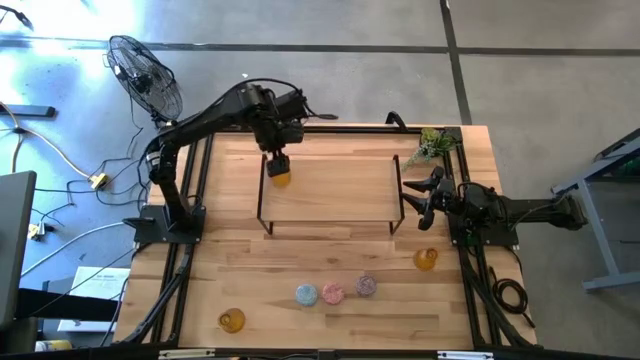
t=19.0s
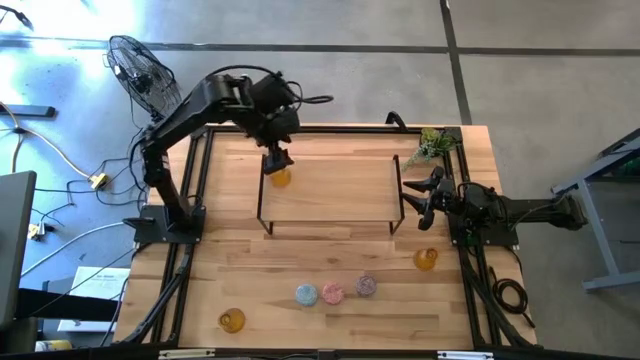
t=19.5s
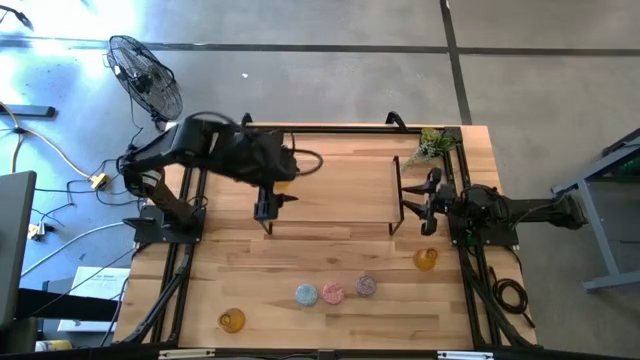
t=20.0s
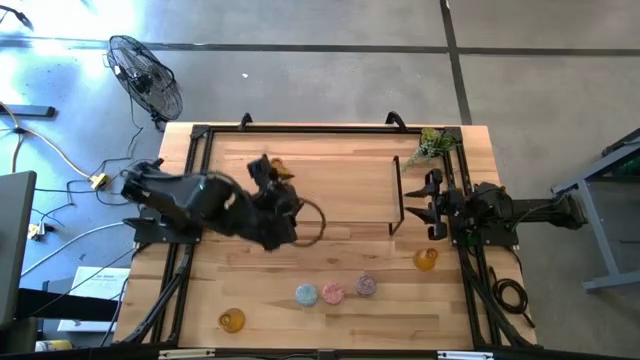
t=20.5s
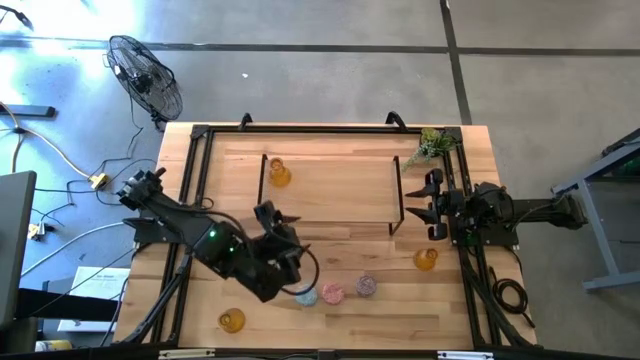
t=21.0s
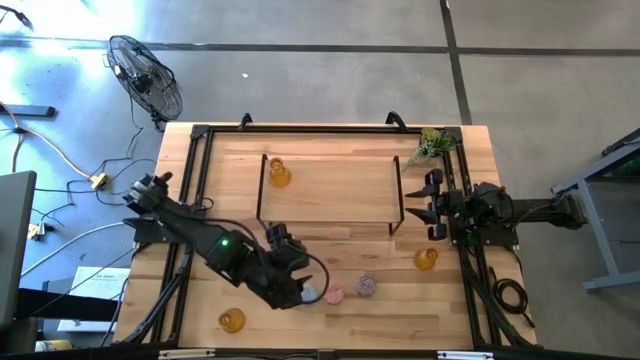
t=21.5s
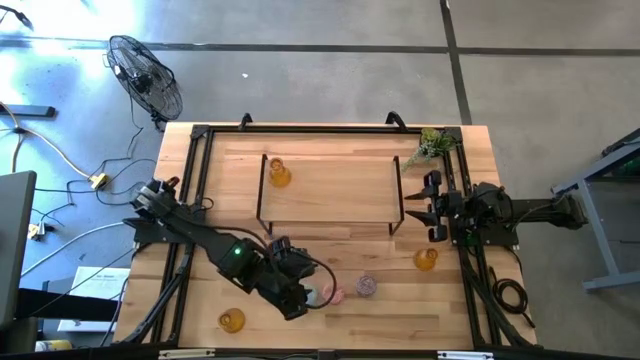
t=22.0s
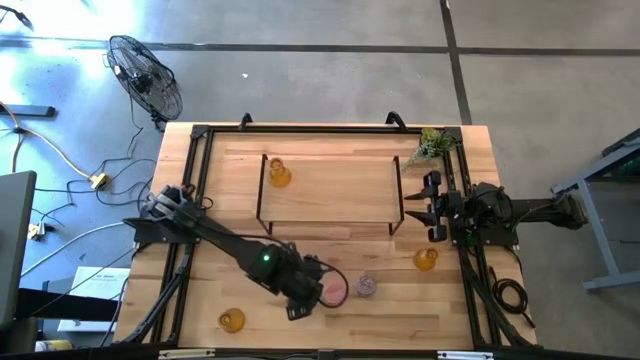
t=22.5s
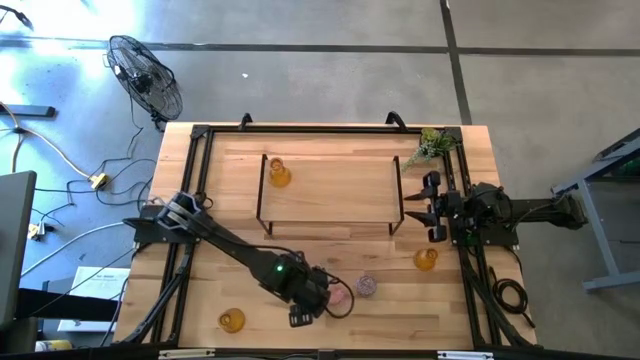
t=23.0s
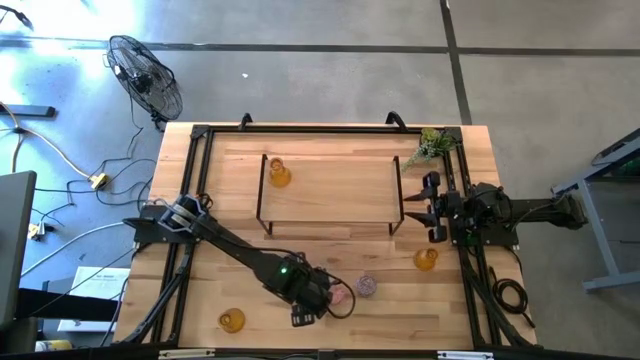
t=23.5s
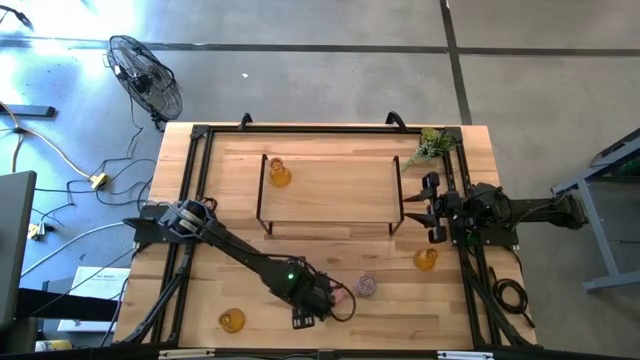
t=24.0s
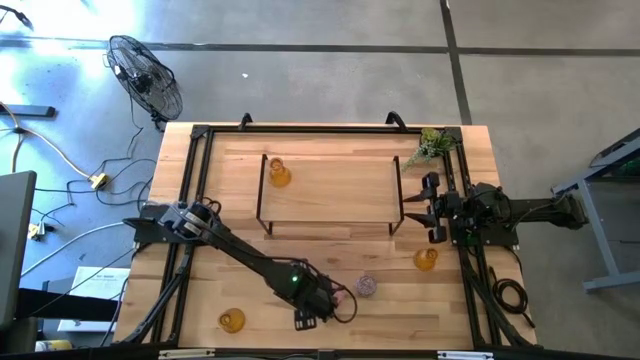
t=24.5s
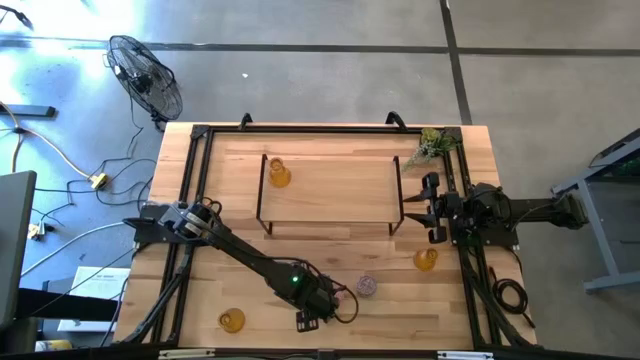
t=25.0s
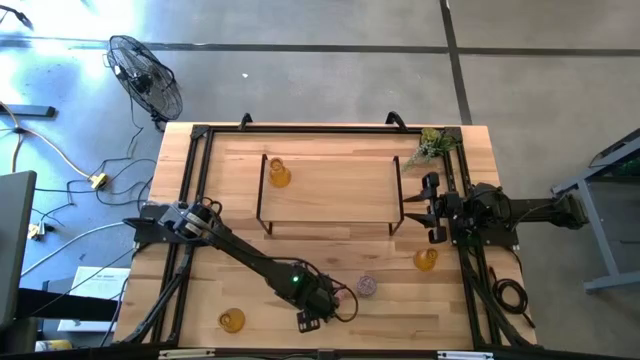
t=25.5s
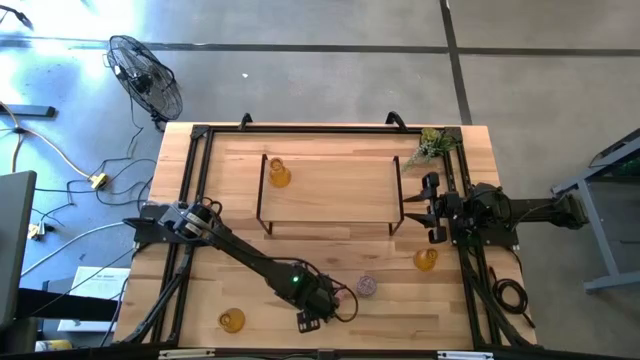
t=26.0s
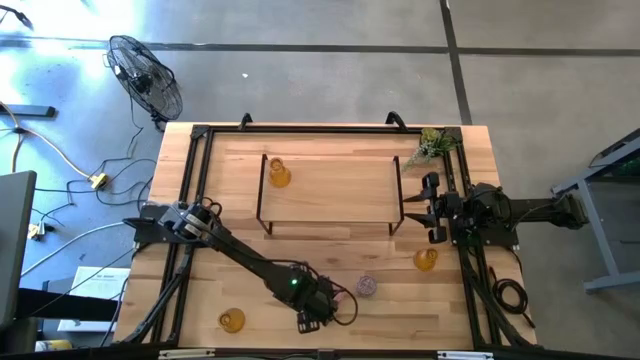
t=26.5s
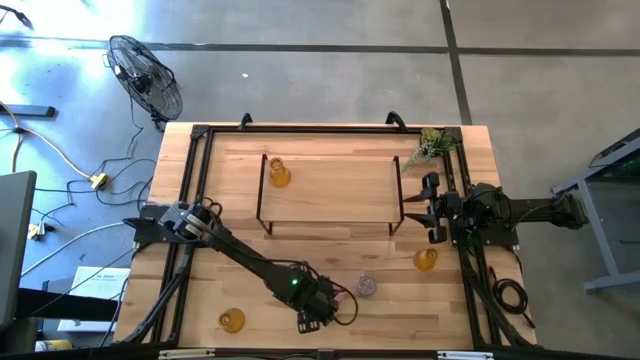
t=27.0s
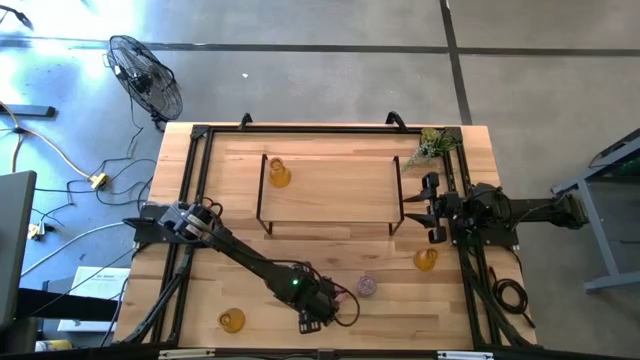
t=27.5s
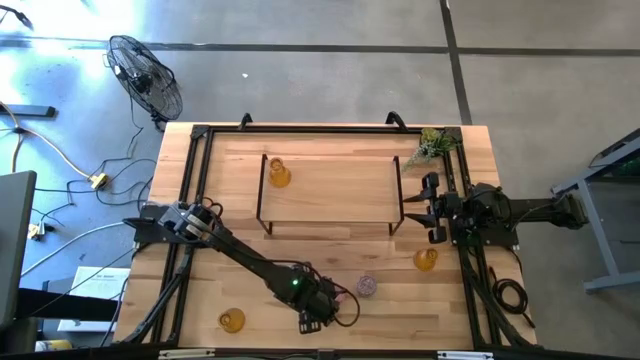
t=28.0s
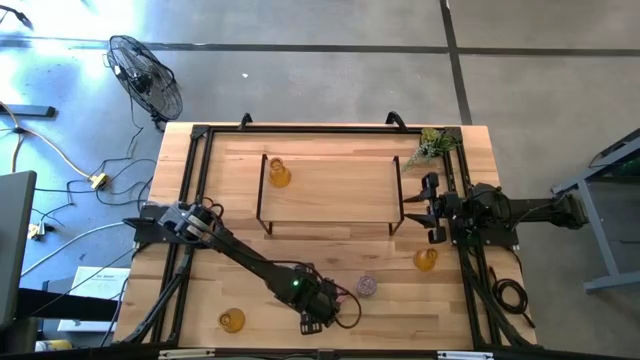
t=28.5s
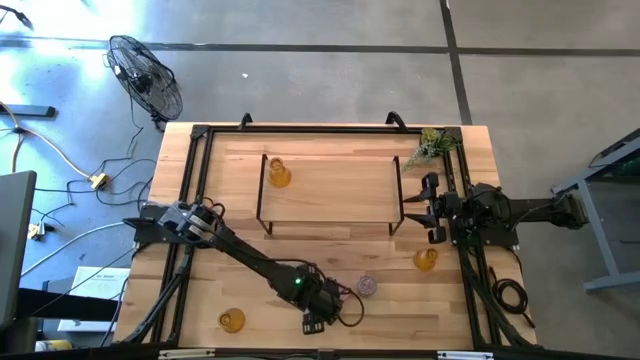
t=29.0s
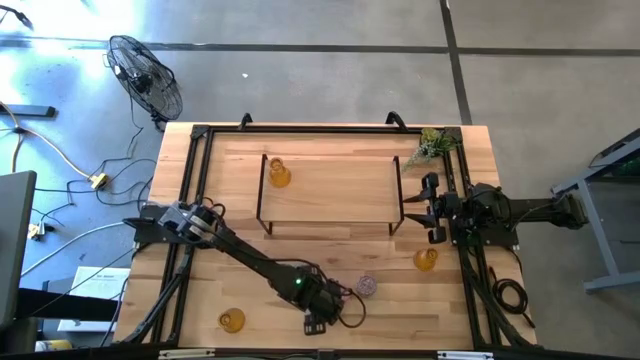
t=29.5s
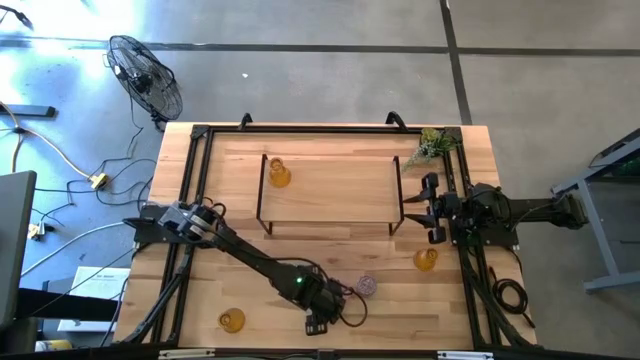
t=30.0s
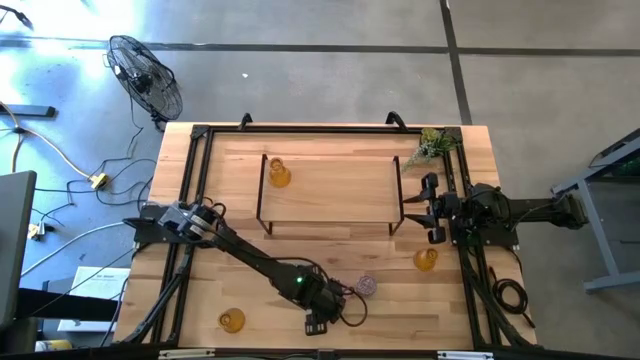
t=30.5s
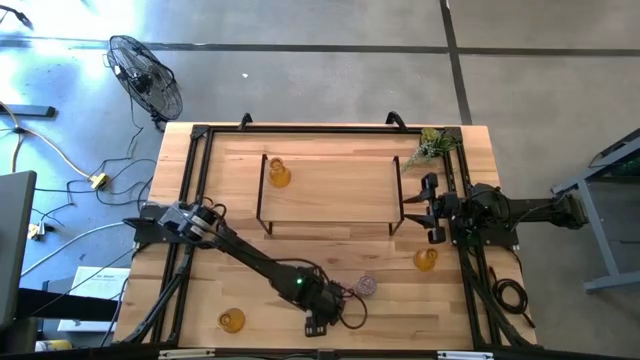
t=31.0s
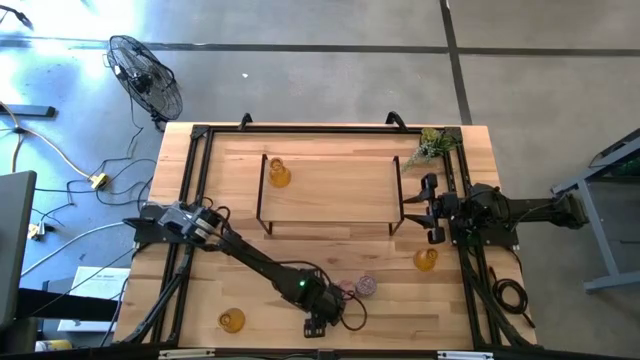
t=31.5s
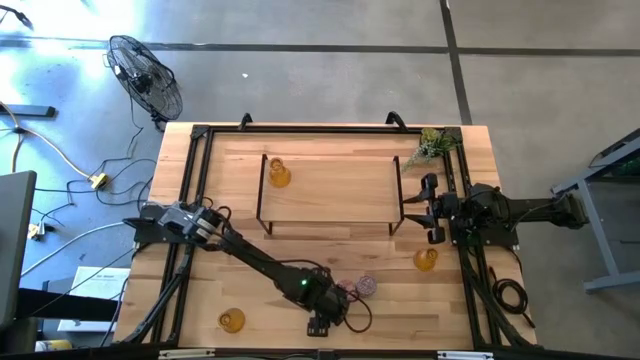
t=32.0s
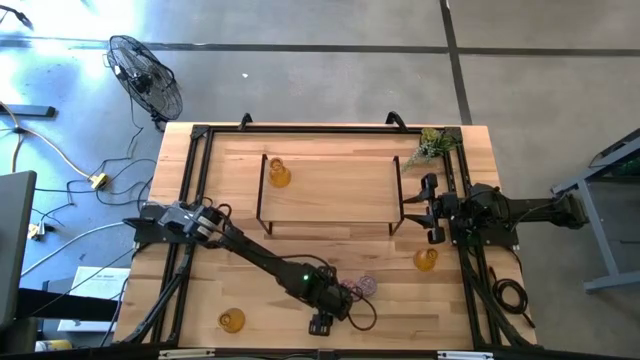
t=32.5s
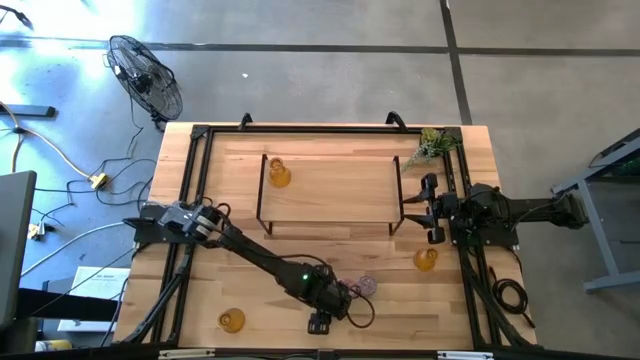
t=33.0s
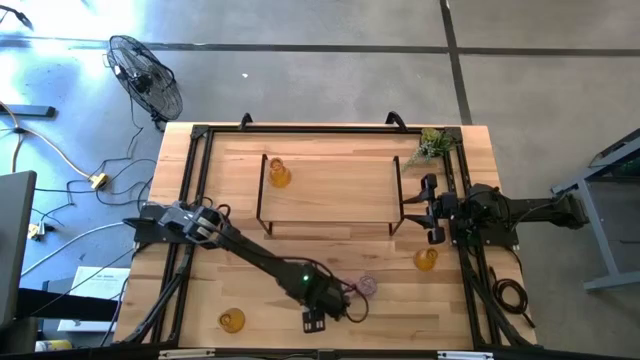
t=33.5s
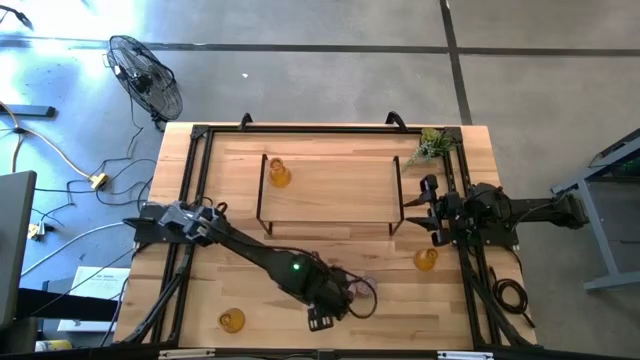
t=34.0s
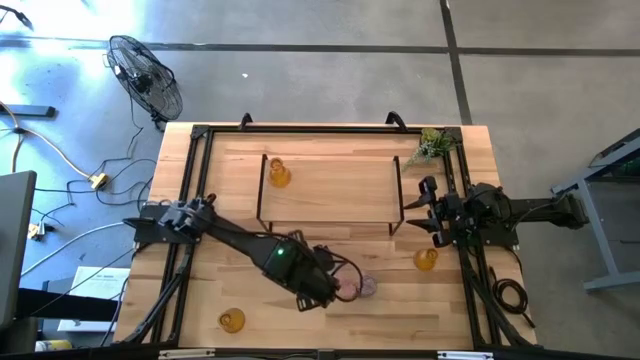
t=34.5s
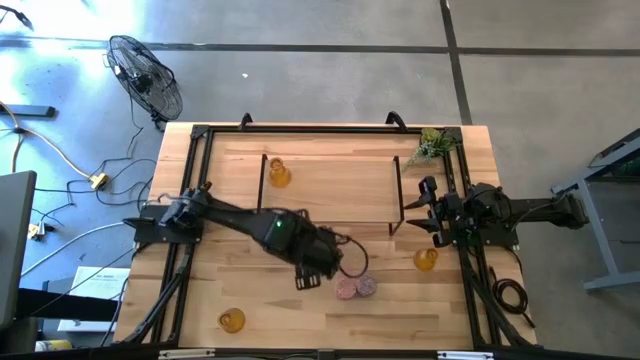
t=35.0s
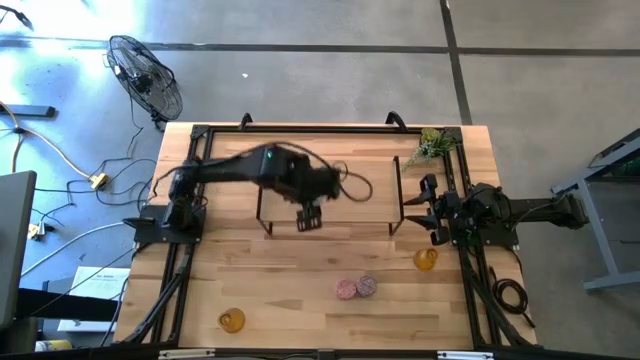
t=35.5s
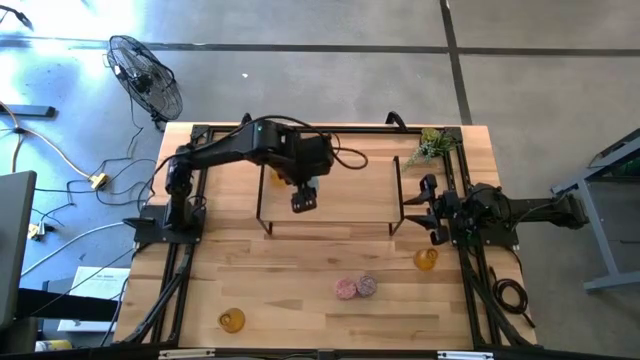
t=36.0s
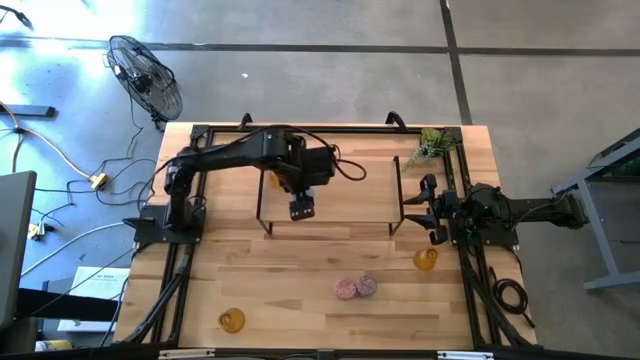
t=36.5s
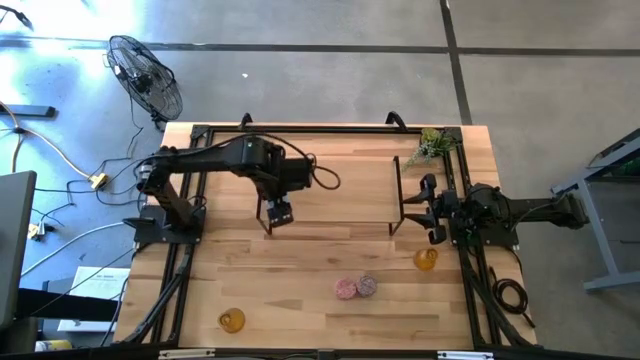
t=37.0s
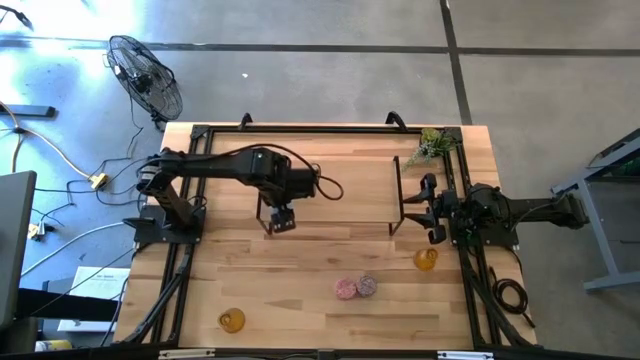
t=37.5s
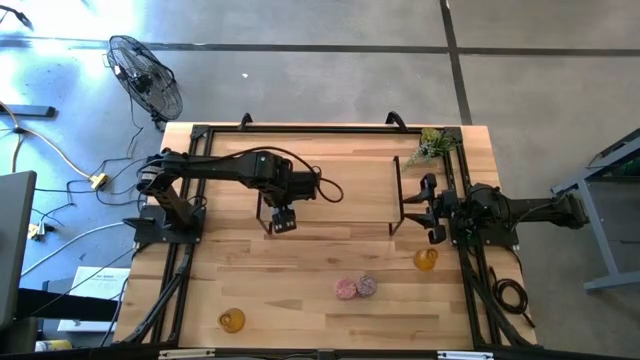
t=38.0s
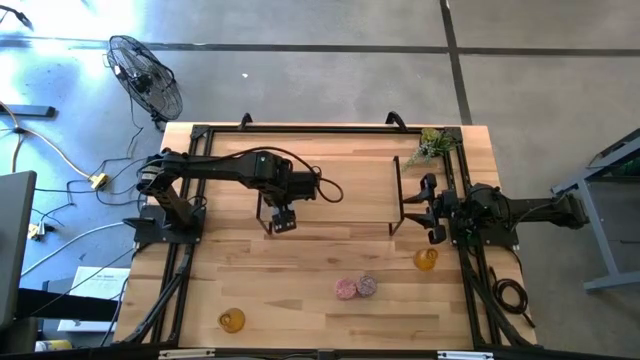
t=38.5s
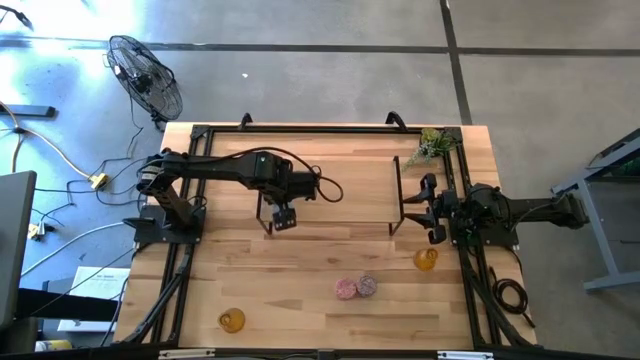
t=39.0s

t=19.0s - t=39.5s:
Task: Pick & Place candle stick holders
Put the blue scented candle on the shelf
